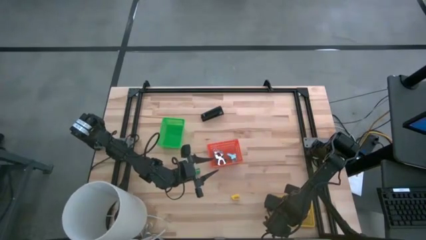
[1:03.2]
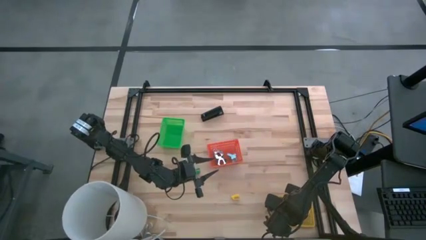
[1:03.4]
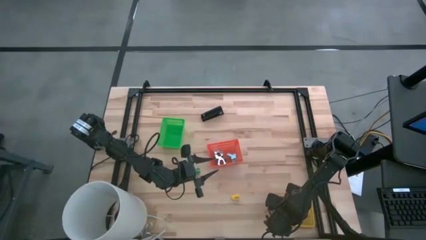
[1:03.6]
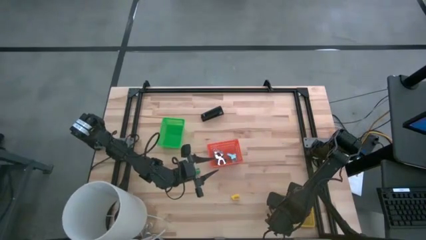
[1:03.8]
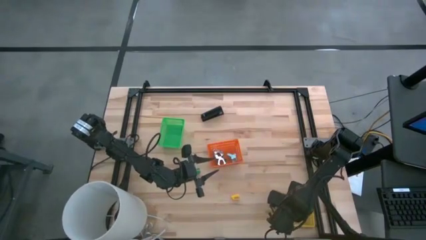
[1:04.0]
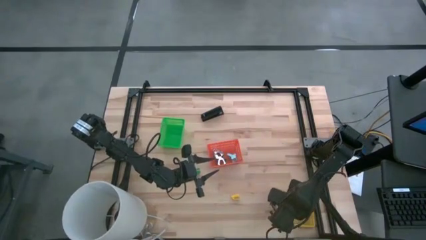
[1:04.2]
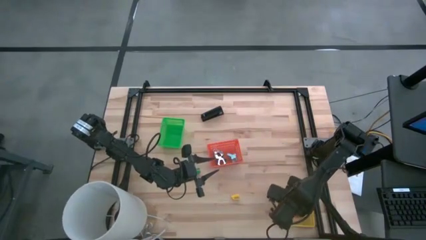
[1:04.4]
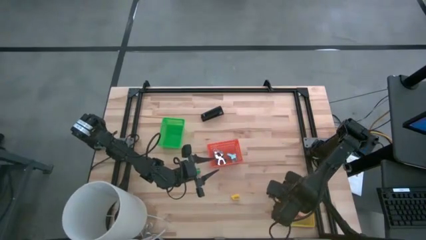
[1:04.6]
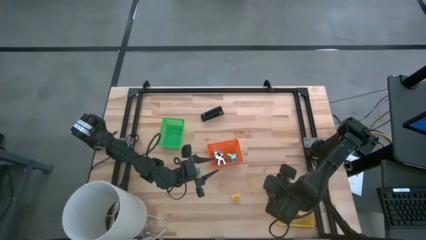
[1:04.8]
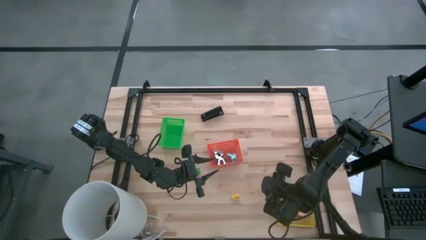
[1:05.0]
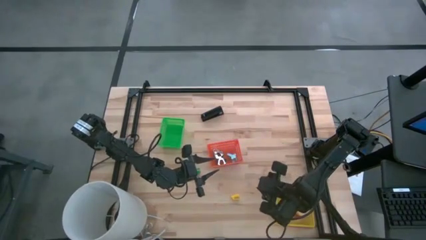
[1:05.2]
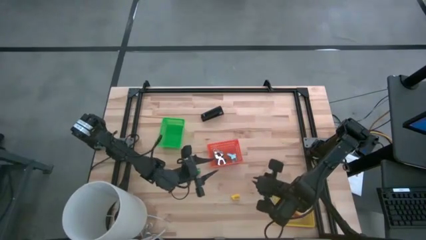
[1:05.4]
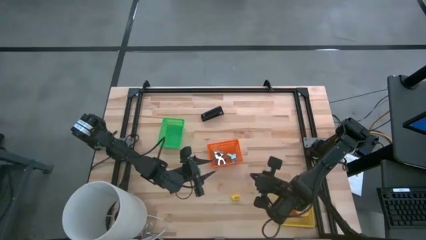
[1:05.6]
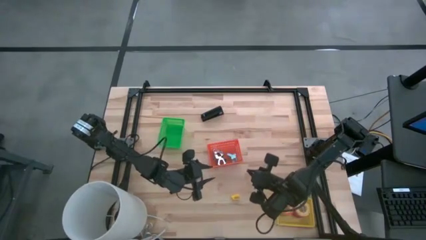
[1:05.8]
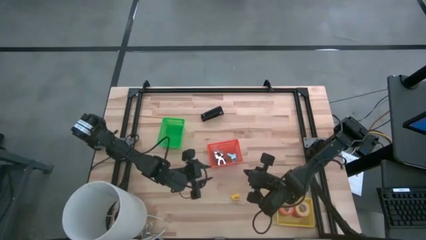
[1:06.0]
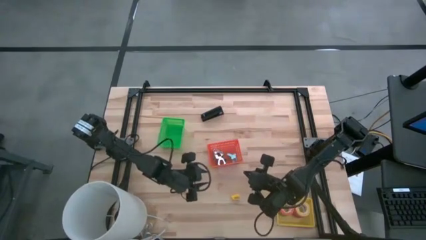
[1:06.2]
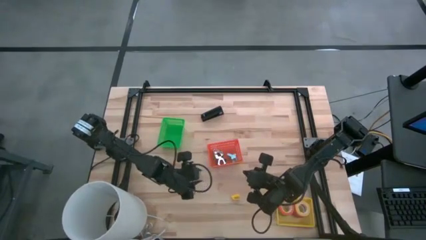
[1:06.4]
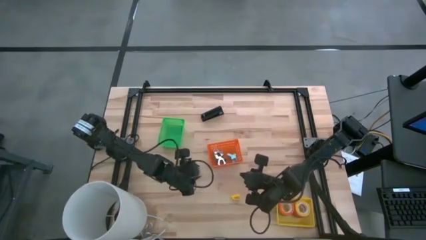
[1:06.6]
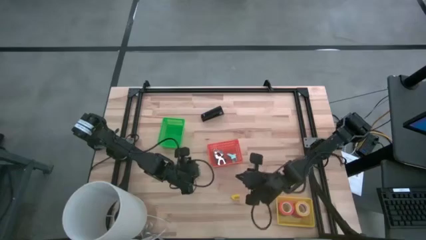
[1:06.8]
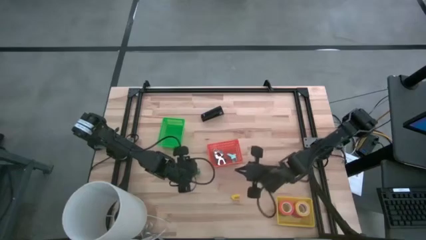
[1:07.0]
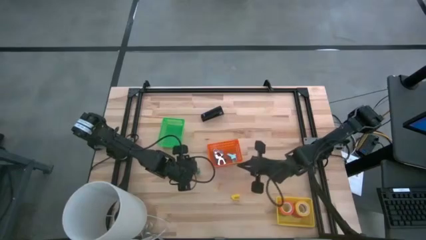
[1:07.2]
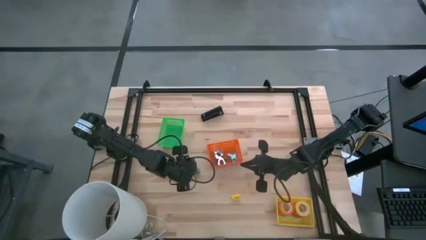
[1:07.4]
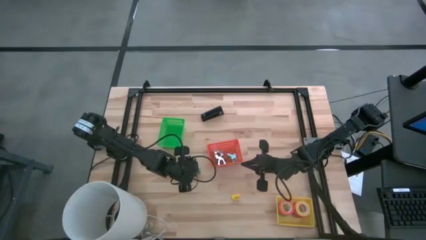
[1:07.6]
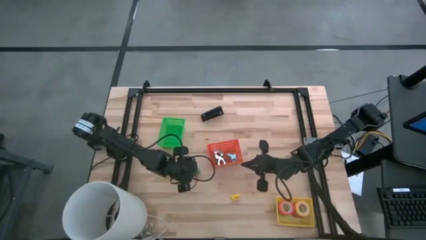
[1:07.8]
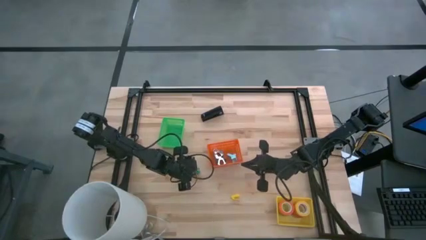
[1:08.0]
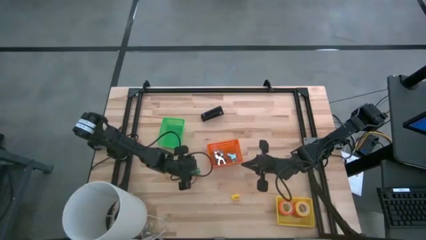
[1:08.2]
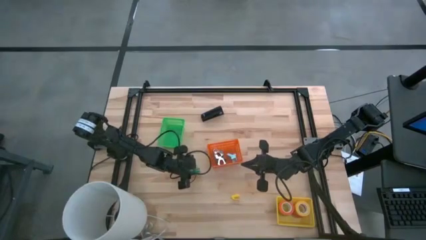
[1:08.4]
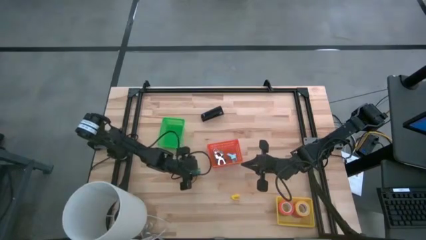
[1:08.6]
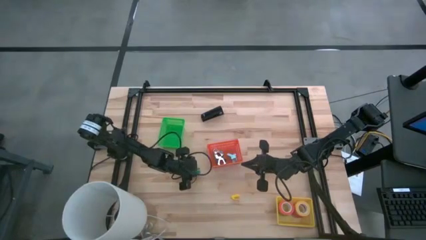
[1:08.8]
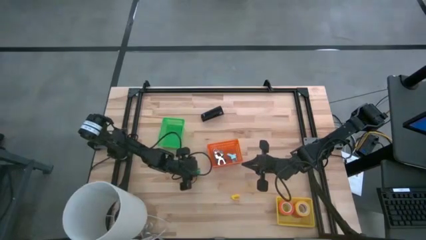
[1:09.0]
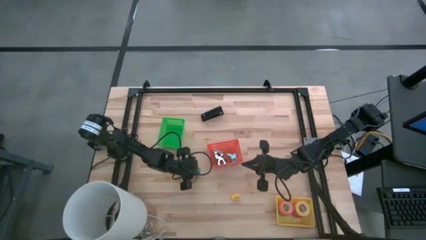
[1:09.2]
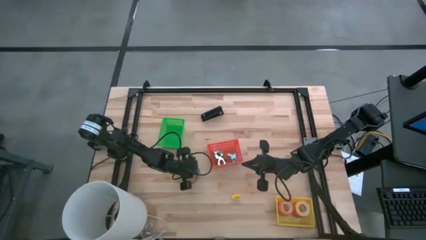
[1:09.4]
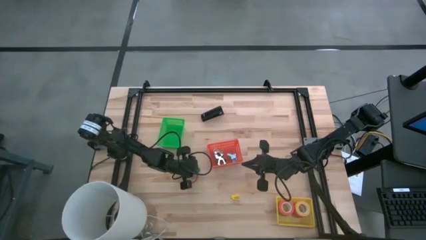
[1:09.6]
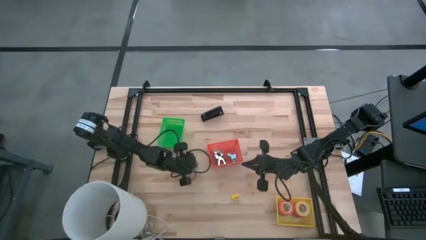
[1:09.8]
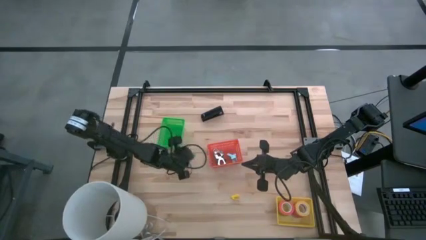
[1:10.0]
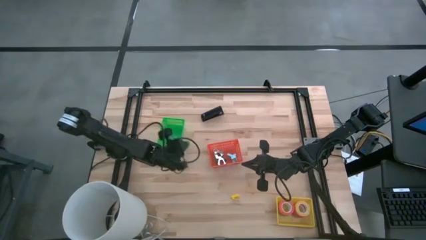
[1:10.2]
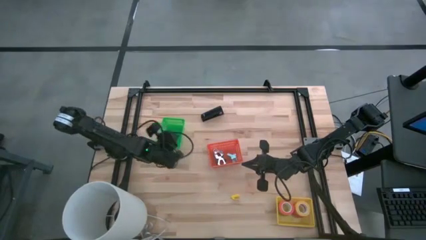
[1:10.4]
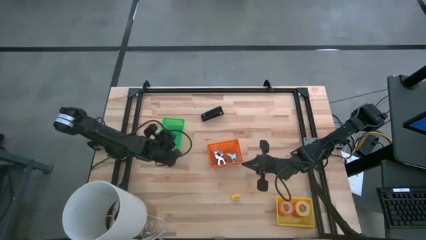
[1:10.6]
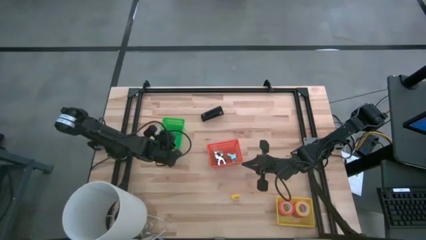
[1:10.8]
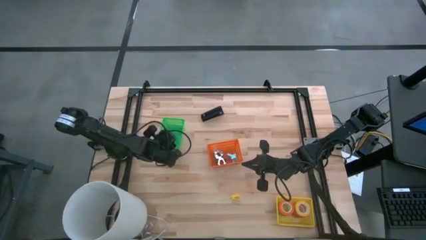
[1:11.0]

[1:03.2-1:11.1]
Task: Pick and place Stapler, Stapler remover, tape
Put the green stapler into the green bin

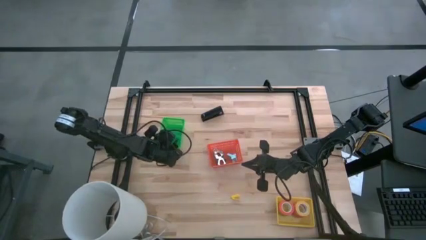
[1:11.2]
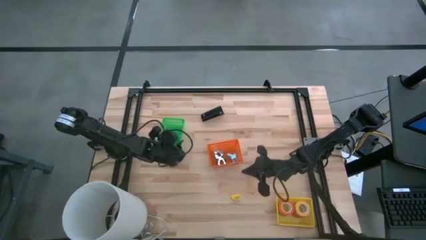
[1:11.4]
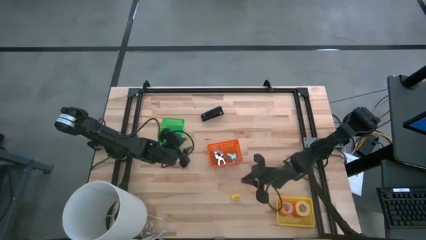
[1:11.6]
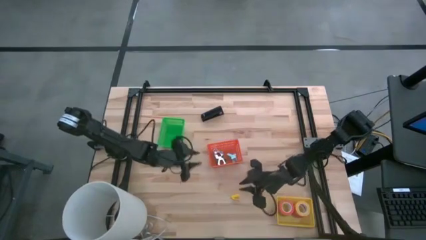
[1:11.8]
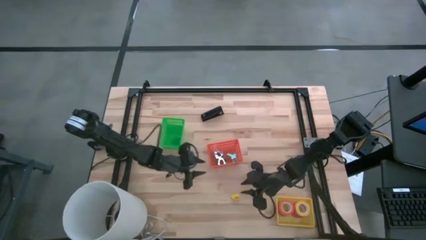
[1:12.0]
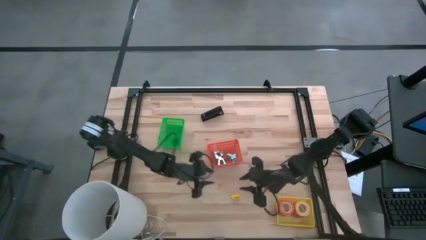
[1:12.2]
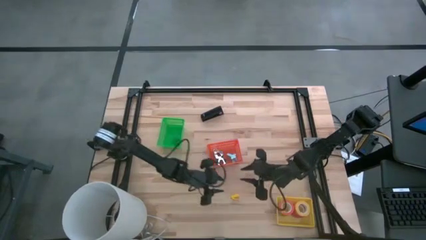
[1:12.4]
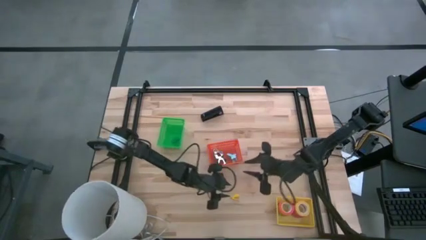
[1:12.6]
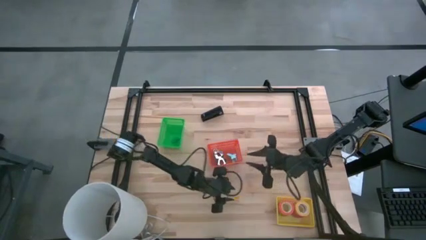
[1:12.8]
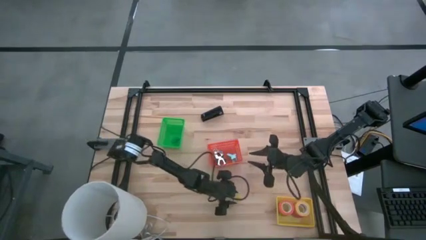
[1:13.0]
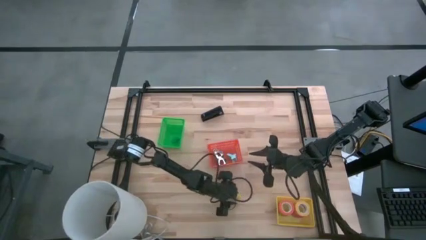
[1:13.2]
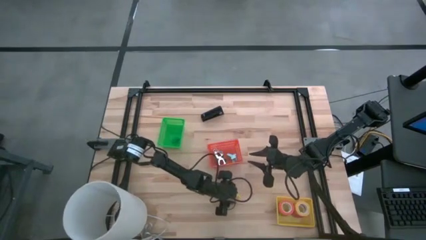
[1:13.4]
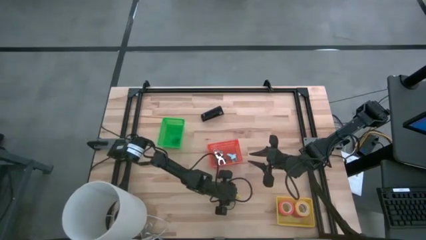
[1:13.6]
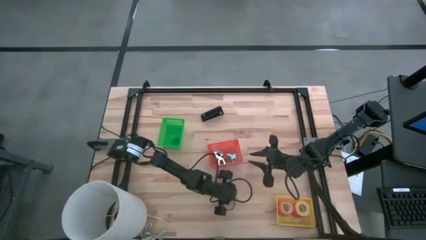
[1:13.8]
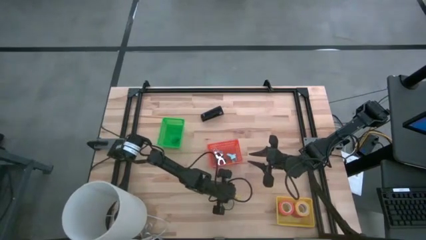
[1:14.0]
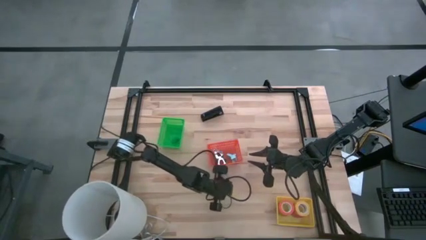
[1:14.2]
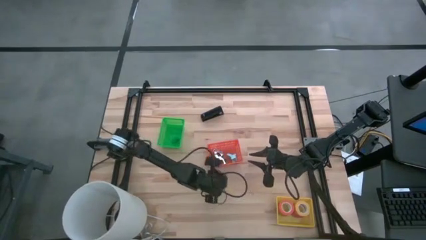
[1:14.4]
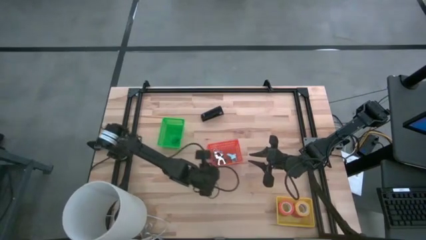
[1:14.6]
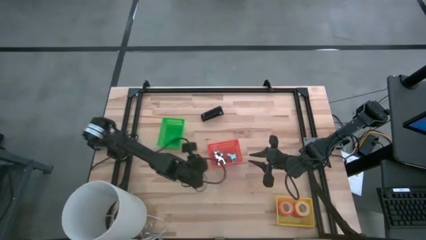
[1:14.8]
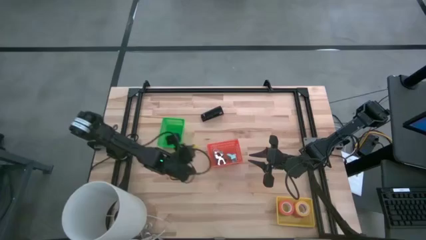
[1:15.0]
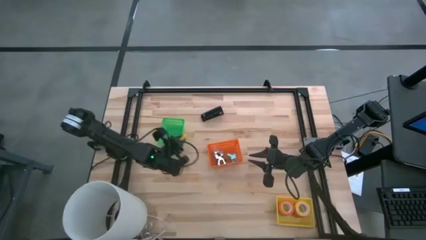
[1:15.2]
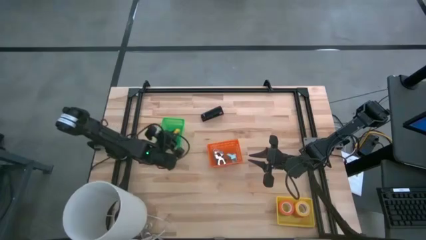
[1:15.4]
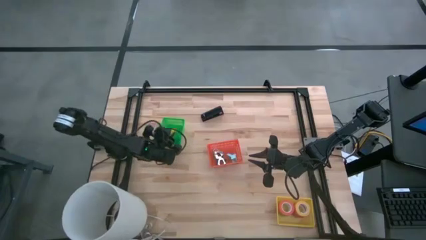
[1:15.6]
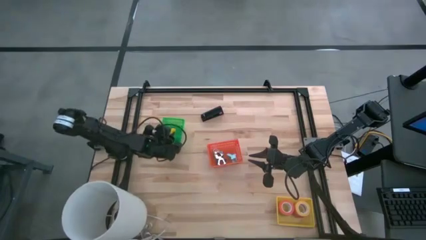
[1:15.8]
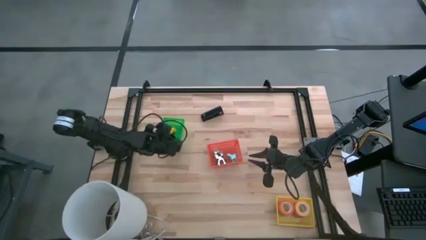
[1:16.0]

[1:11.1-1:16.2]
Put the yellow stapler into the green bin

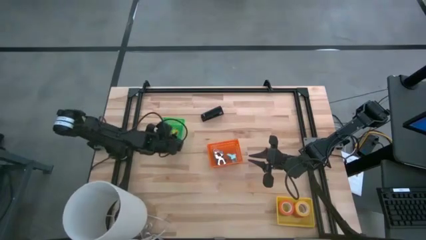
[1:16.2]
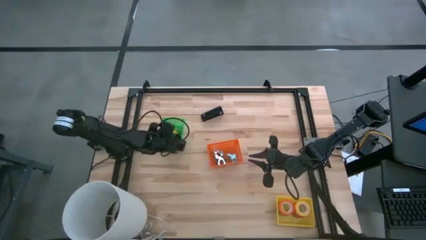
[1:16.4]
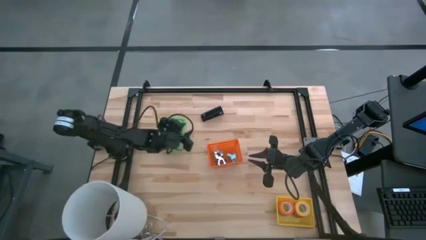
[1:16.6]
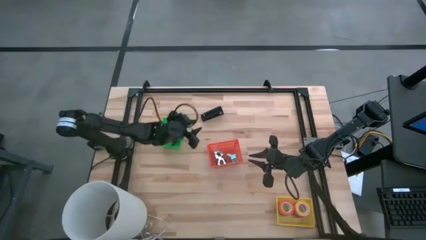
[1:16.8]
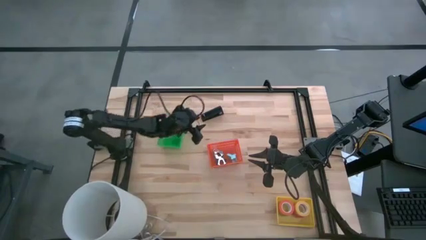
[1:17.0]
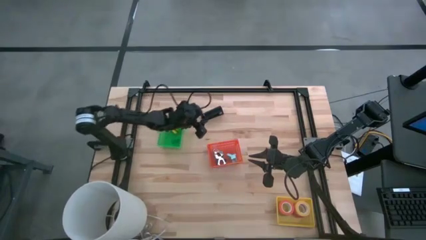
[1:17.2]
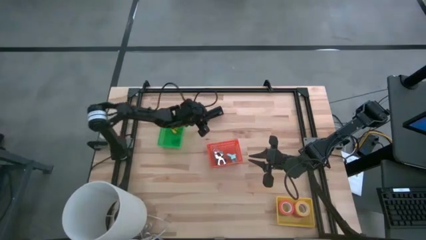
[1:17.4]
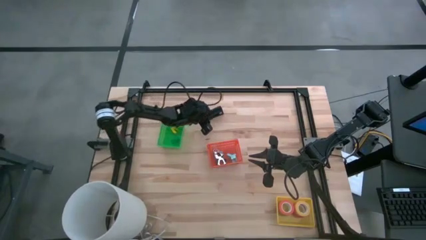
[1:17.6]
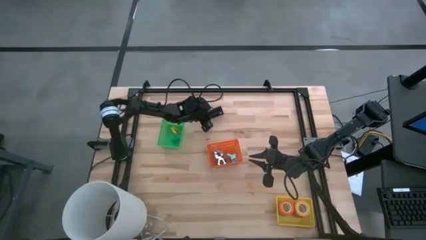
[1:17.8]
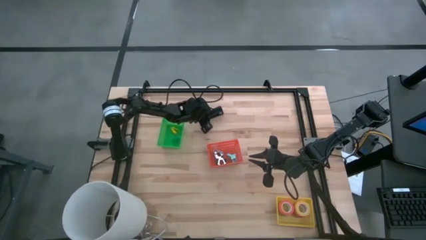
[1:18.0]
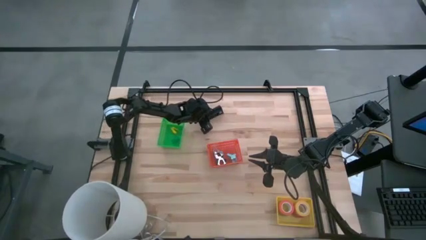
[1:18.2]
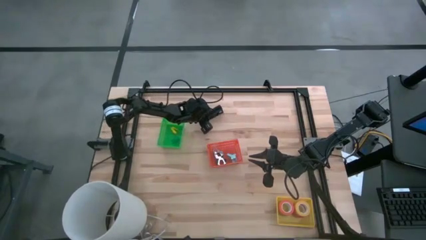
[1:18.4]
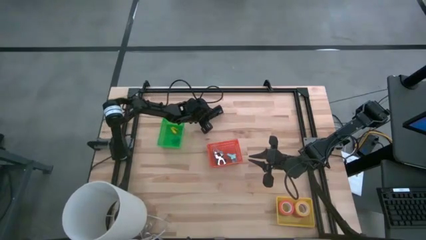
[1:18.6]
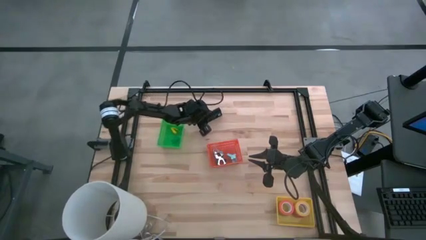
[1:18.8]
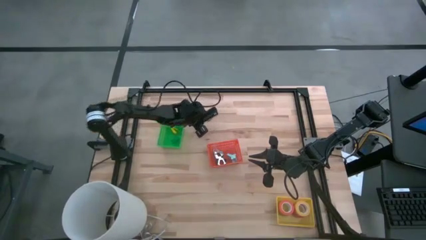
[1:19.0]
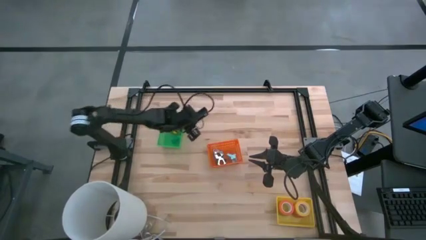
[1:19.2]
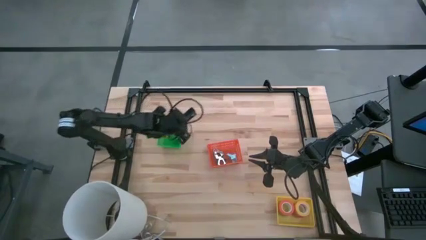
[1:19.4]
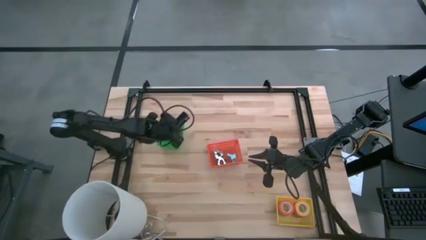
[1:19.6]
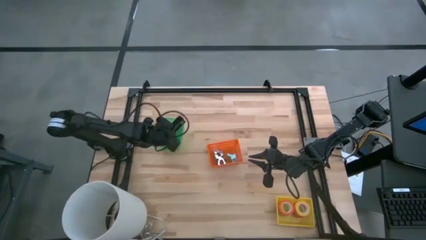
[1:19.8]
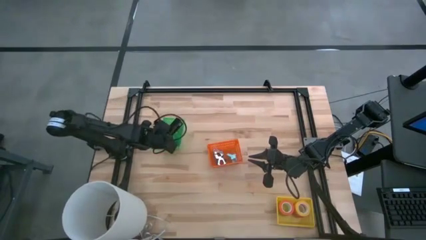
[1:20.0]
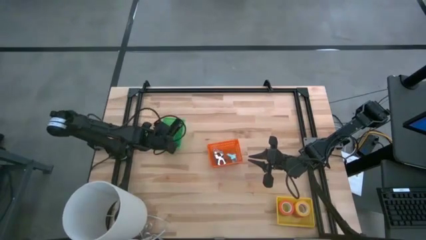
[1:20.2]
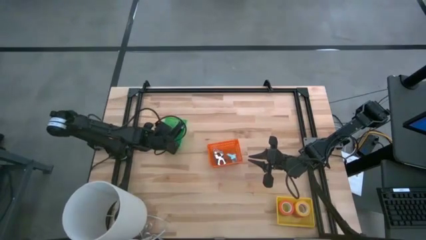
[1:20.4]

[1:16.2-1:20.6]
Put the black stapler into the green bin
